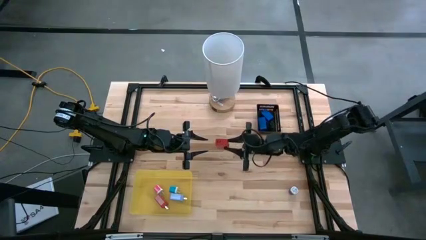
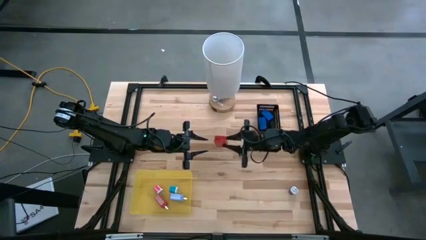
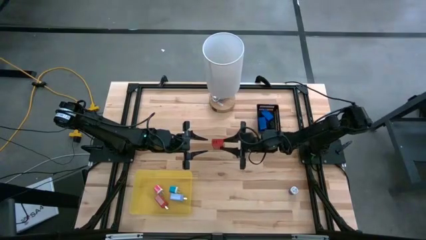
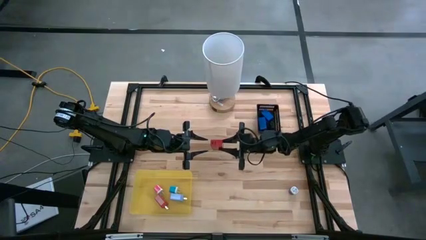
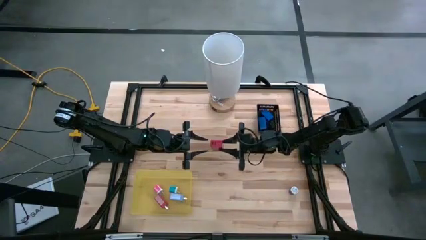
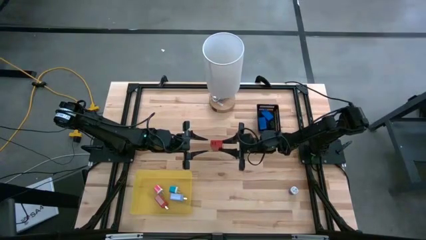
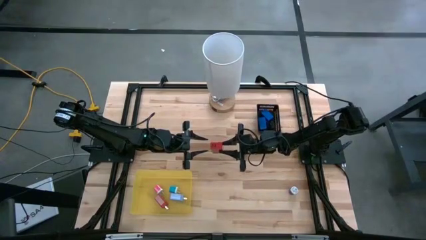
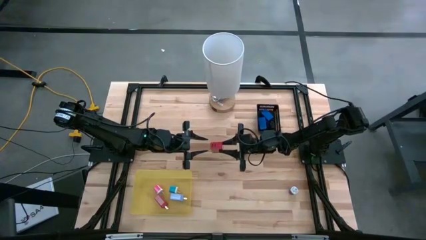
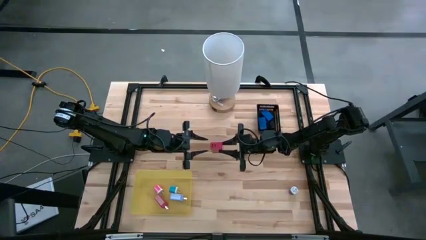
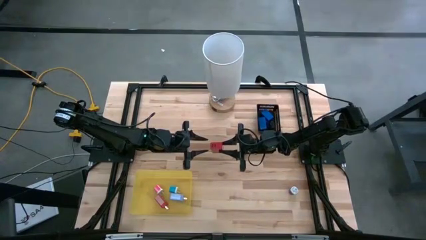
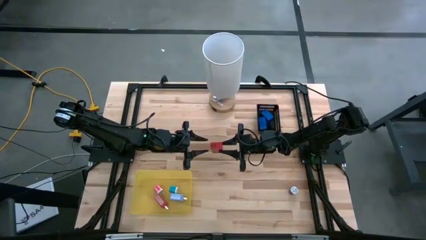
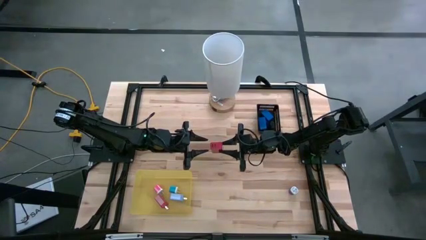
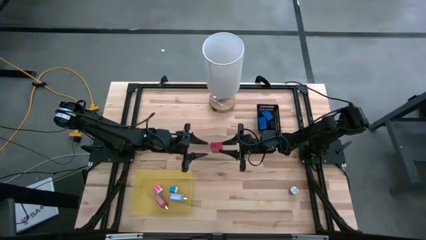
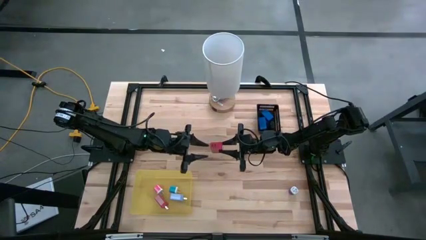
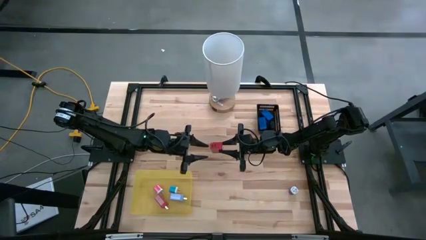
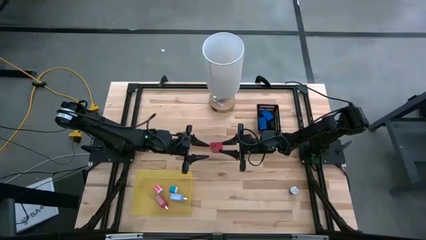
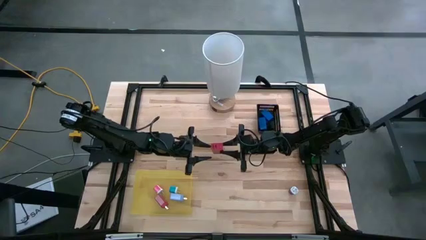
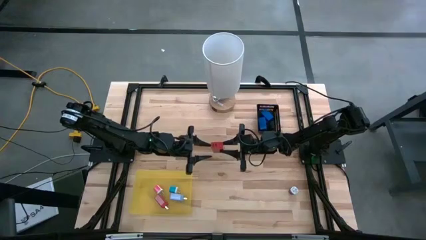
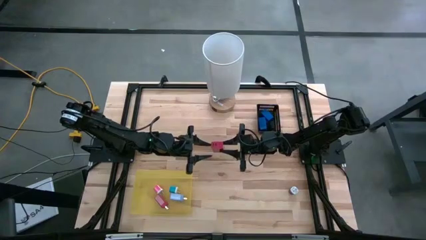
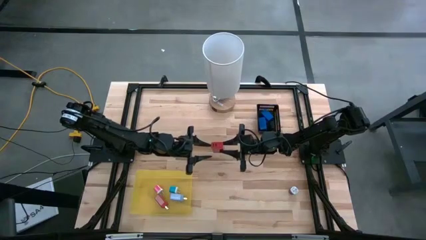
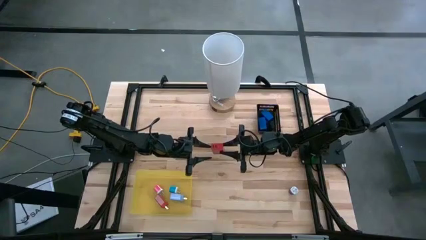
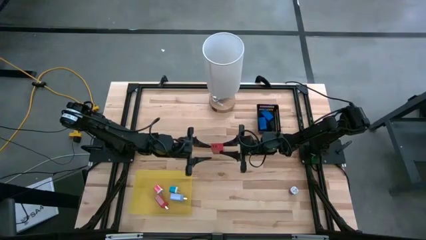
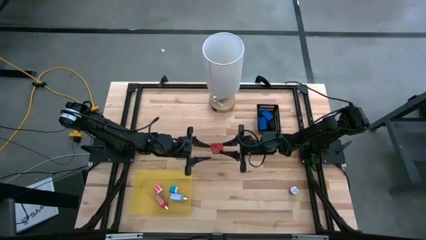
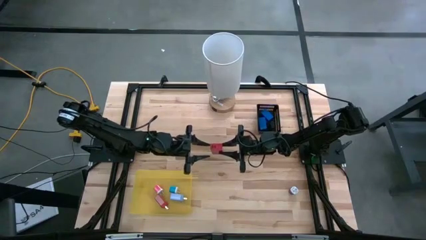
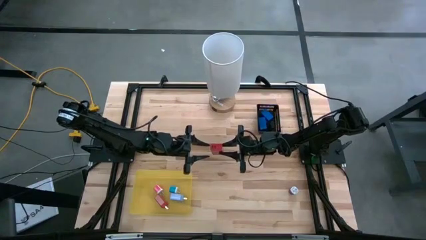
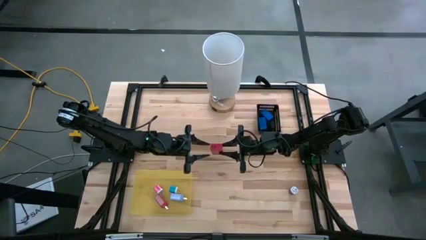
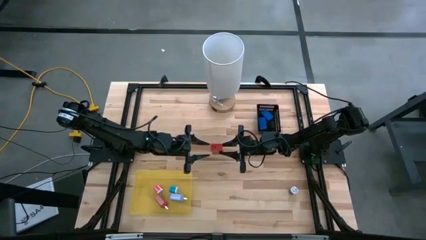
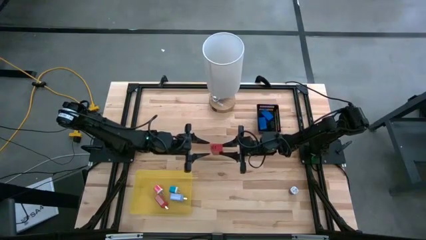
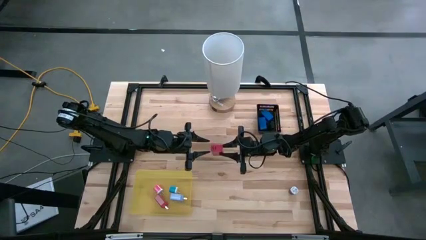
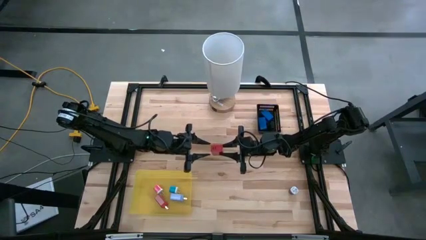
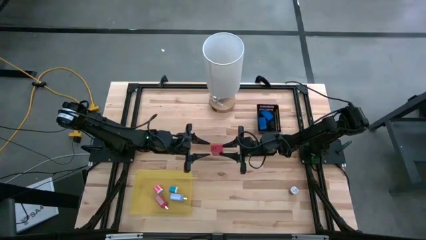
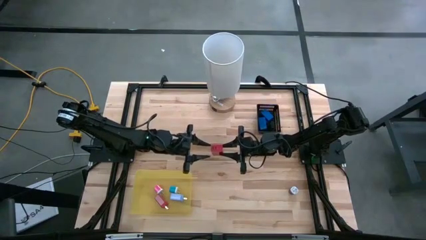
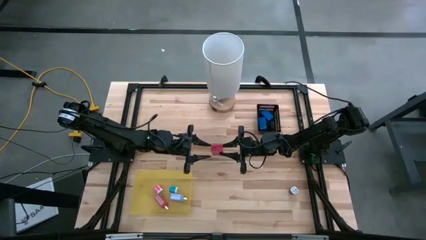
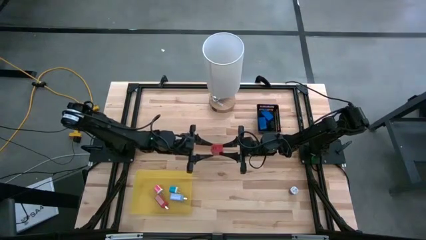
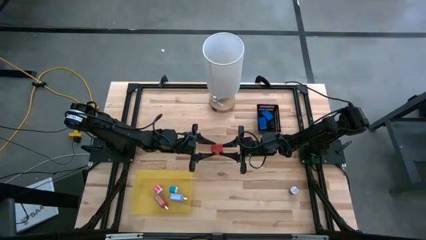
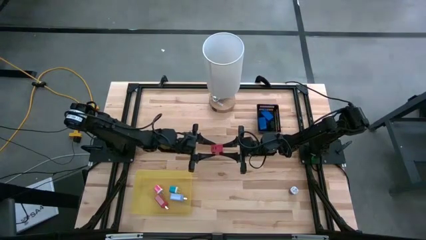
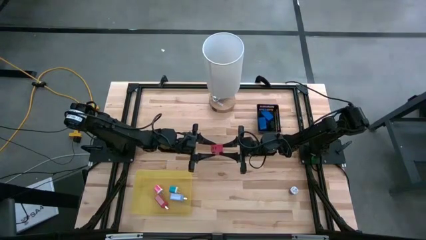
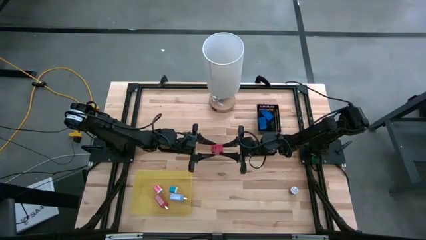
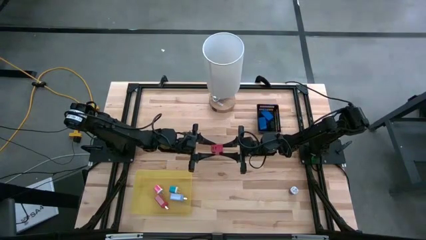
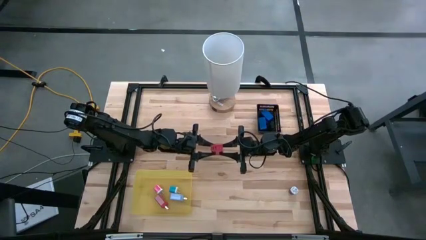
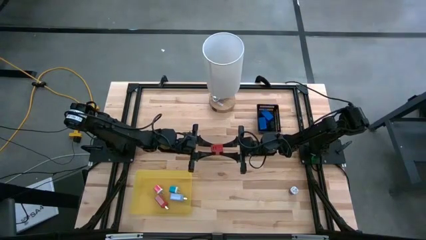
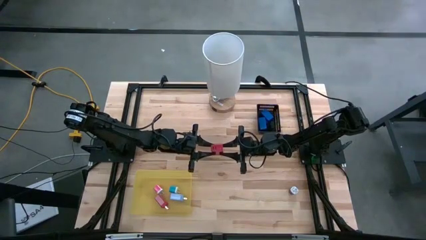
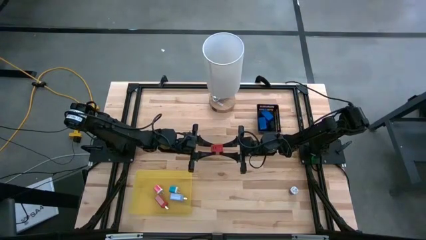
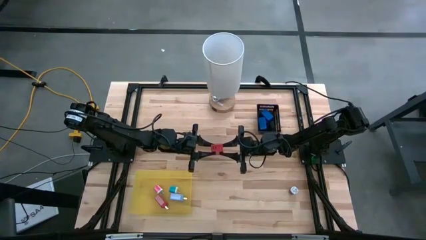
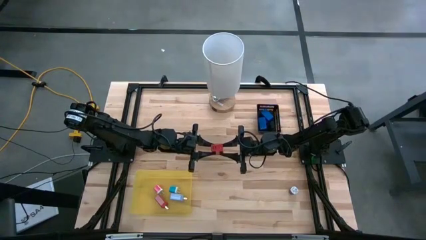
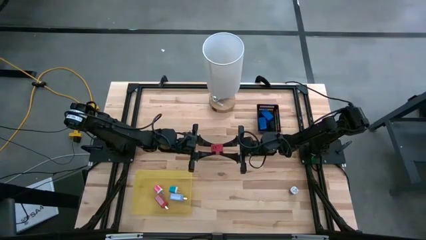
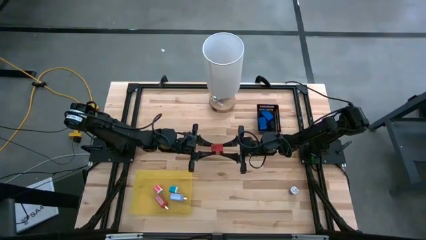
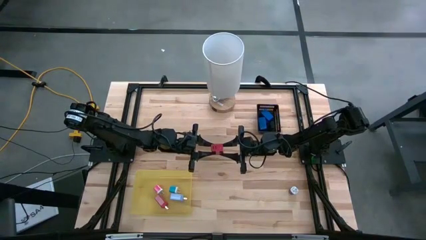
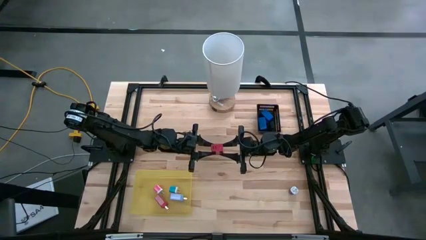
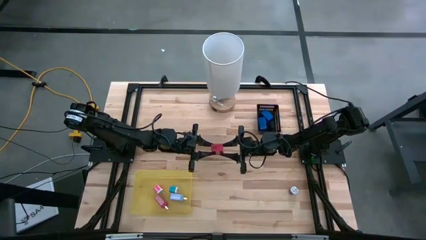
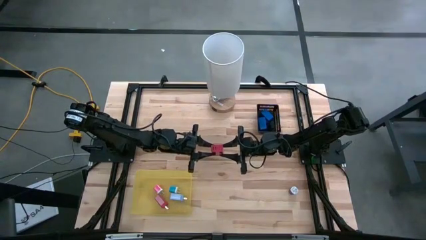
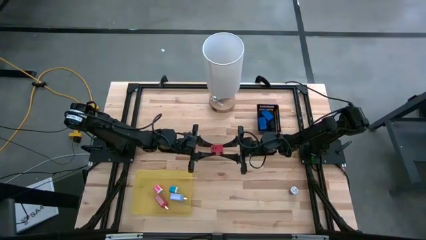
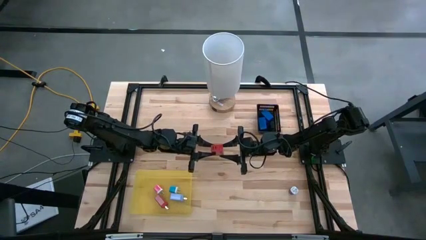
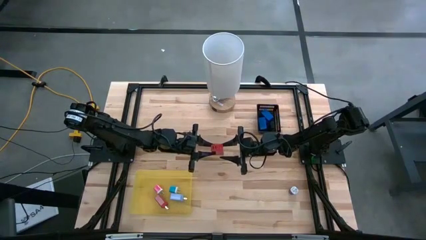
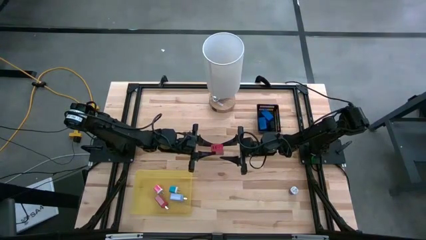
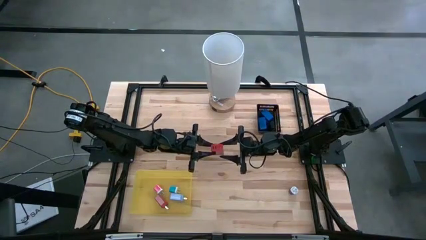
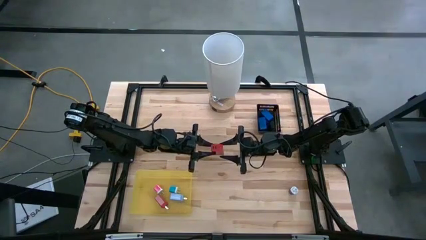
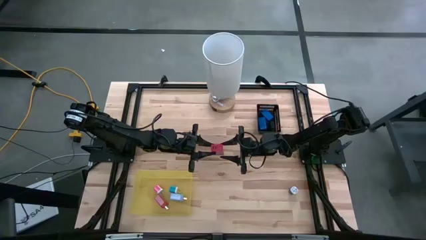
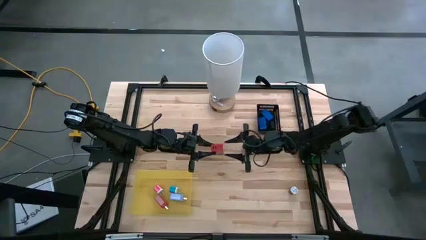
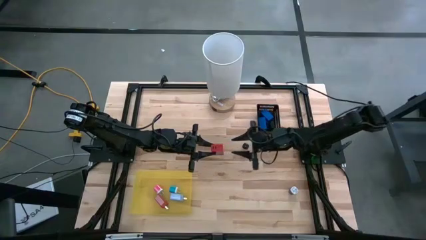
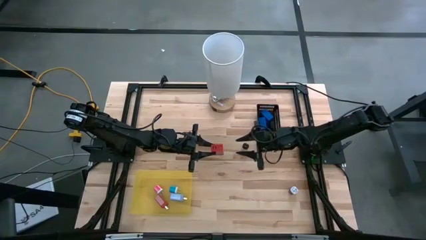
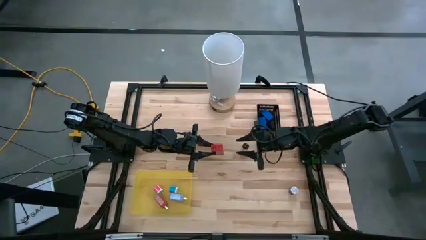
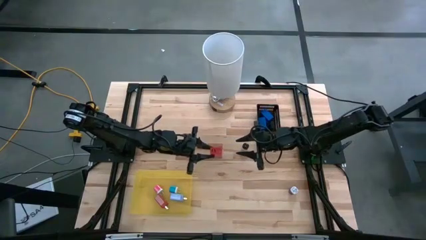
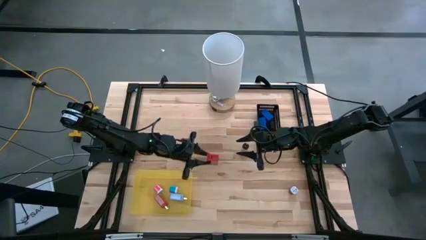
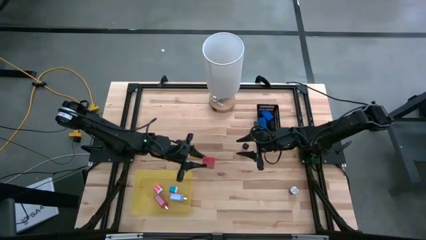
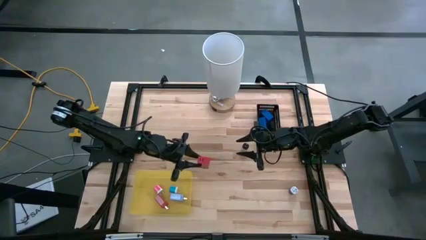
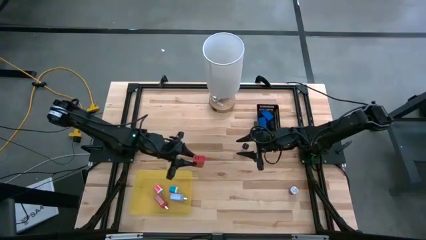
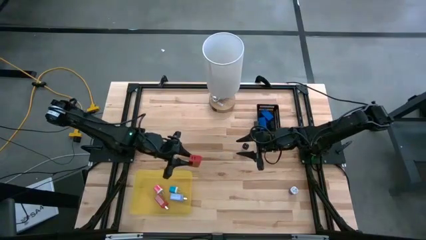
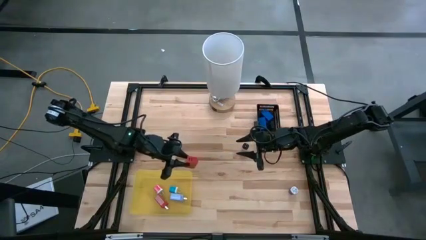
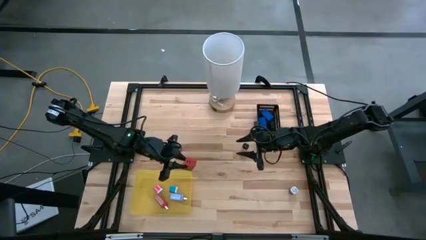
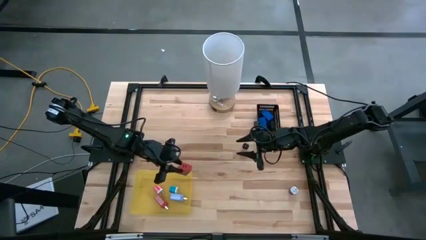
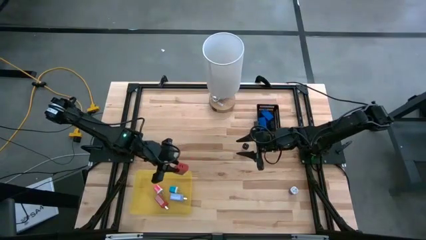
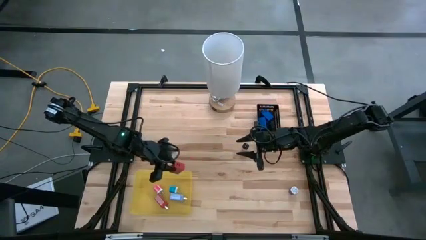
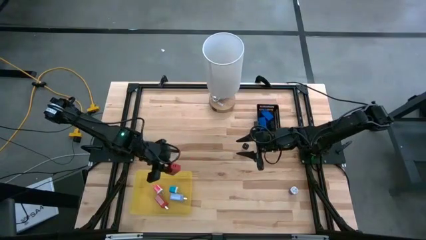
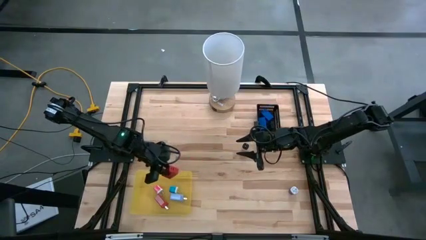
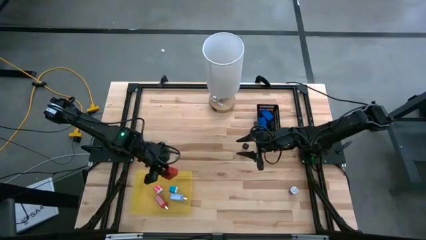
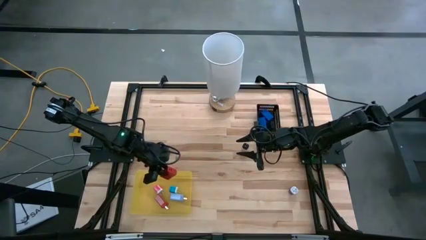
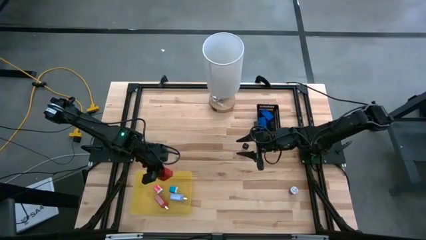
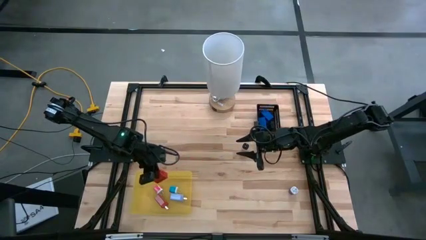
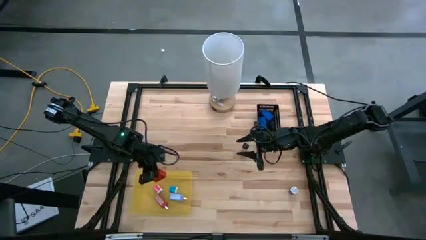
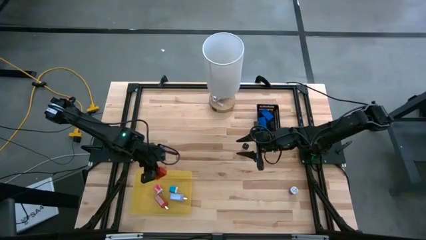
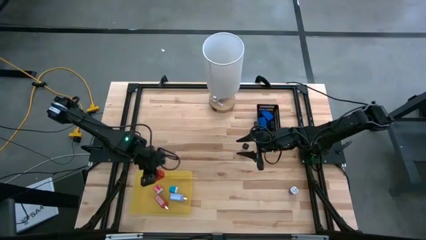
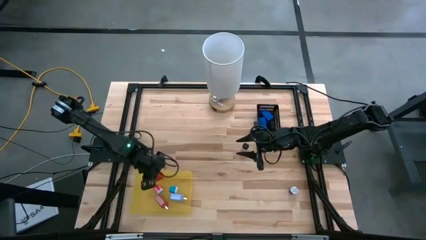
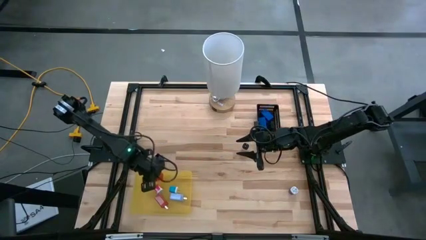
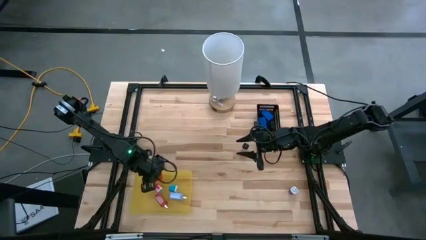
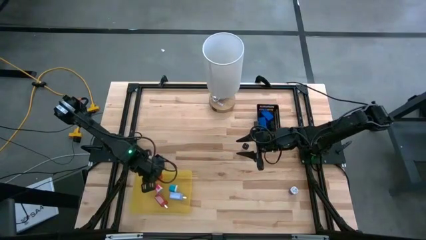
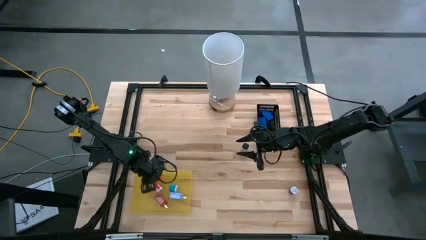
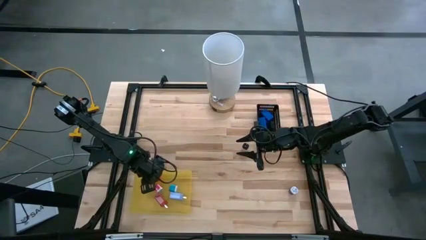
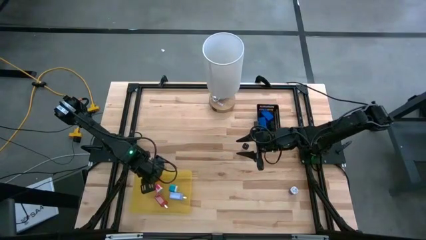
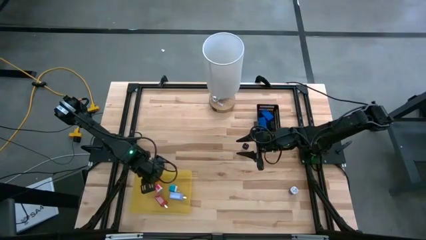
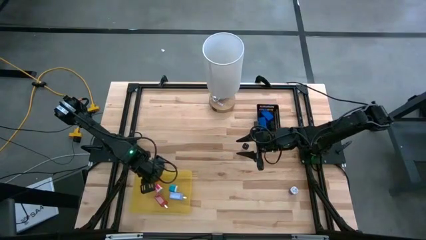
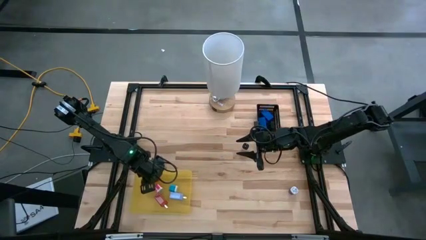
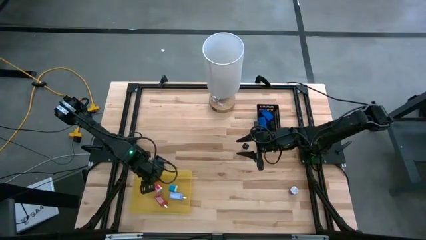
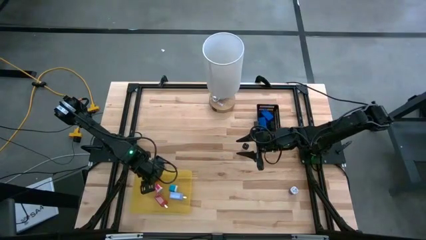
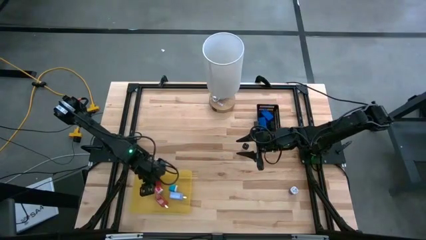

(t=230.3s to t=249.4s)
Task: Pick & Place Office items
Put the red charger adapter into the yellow bin
